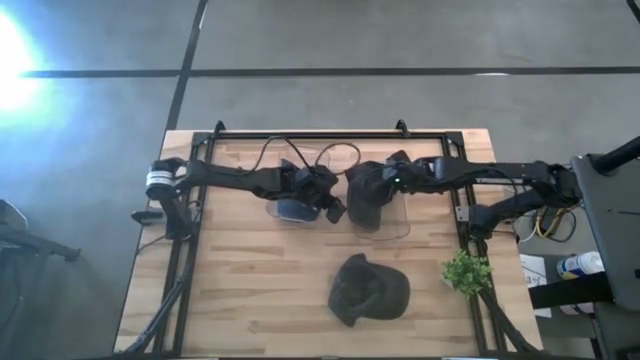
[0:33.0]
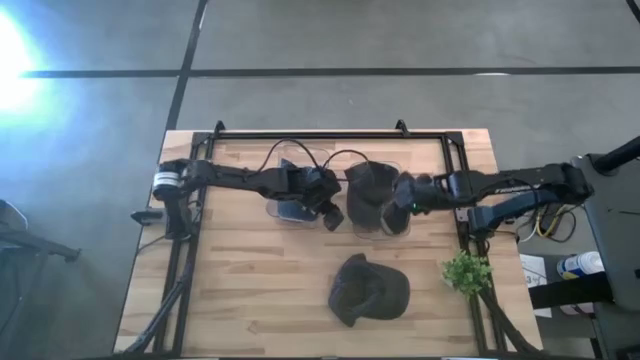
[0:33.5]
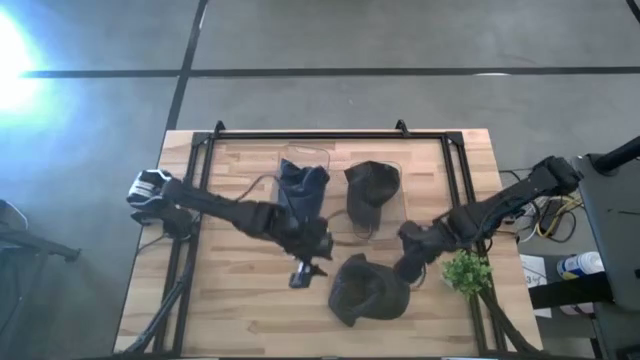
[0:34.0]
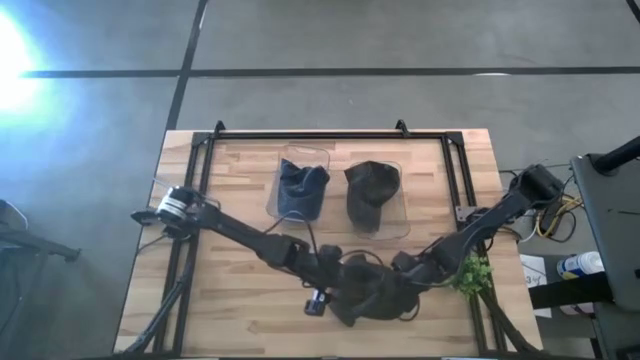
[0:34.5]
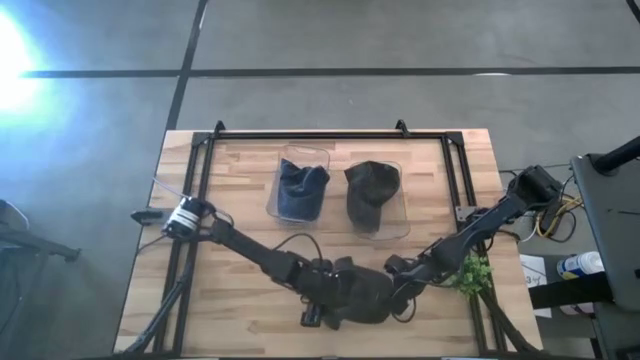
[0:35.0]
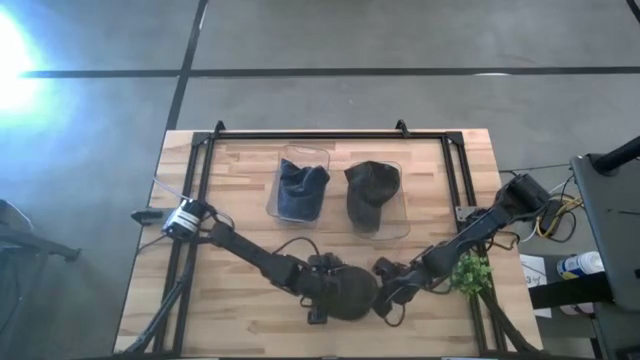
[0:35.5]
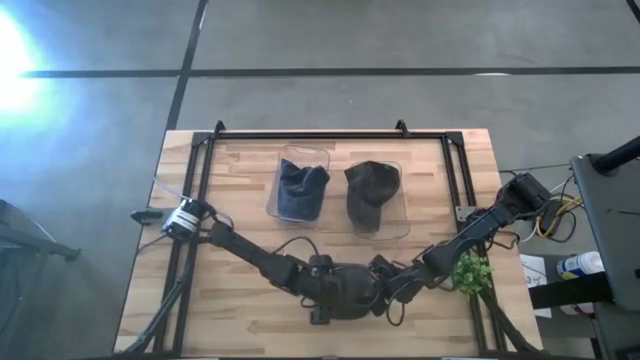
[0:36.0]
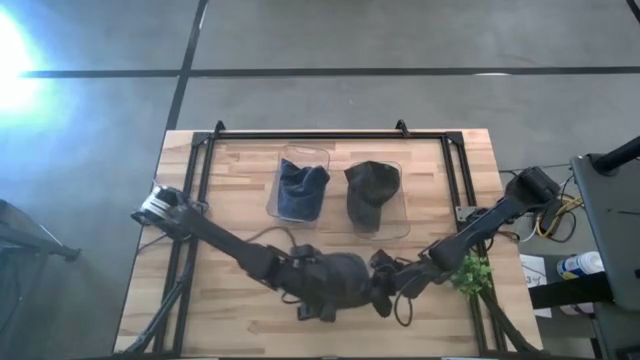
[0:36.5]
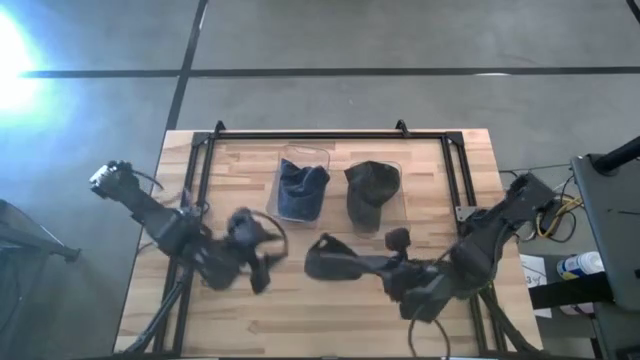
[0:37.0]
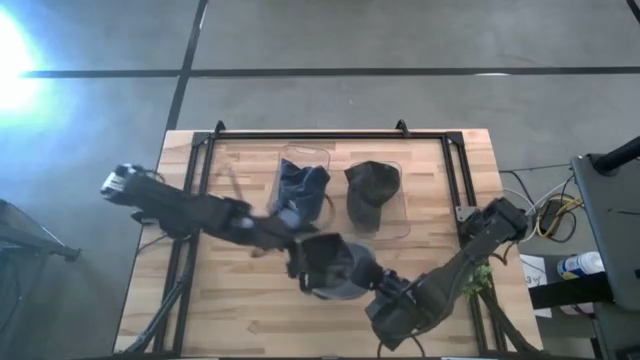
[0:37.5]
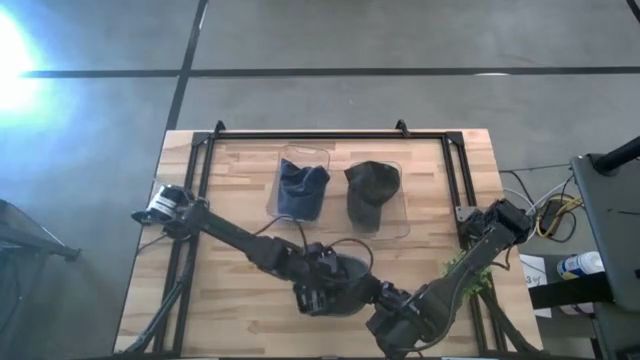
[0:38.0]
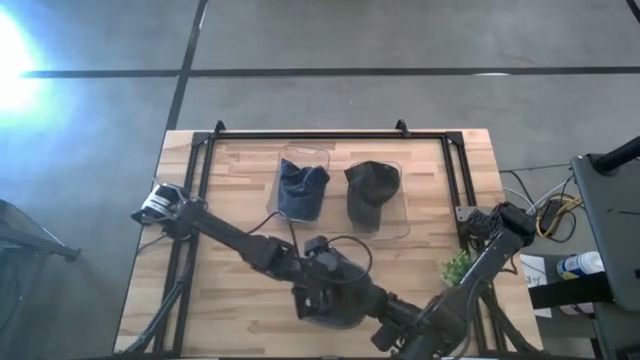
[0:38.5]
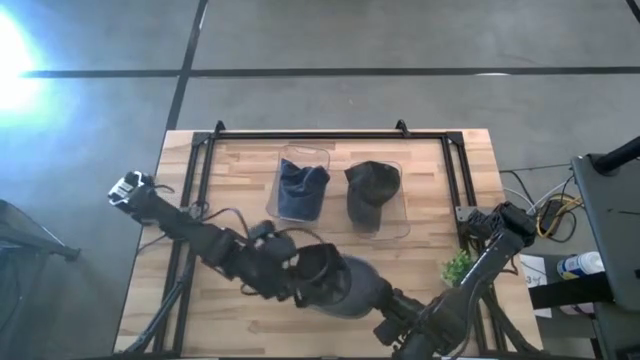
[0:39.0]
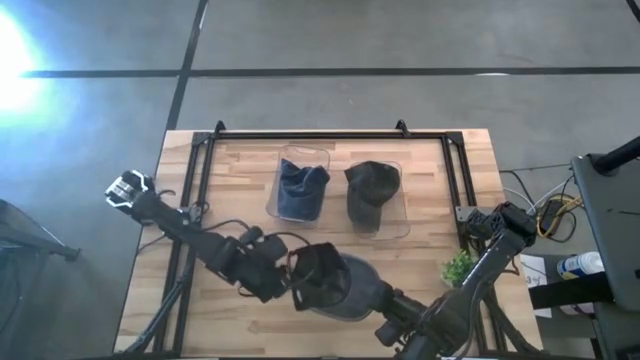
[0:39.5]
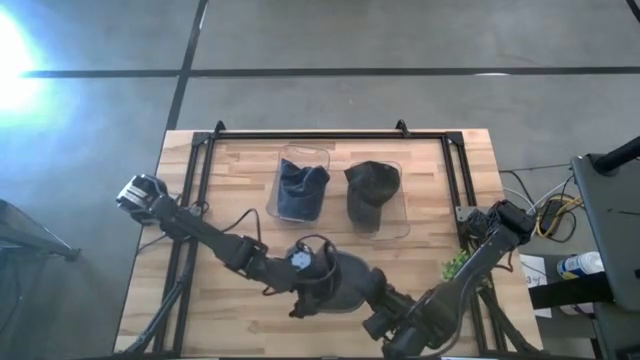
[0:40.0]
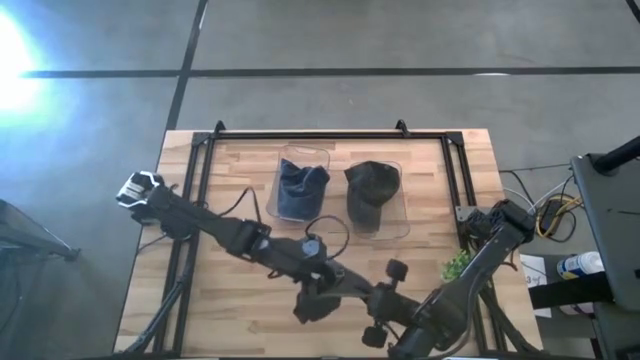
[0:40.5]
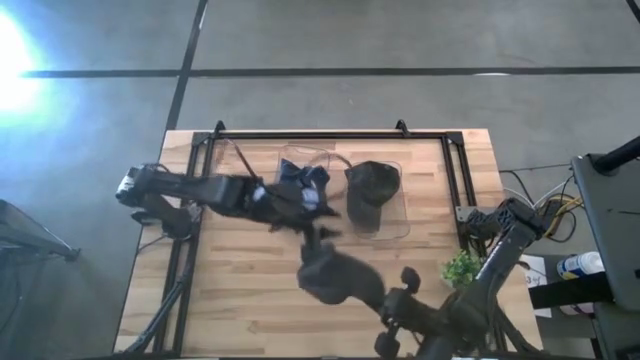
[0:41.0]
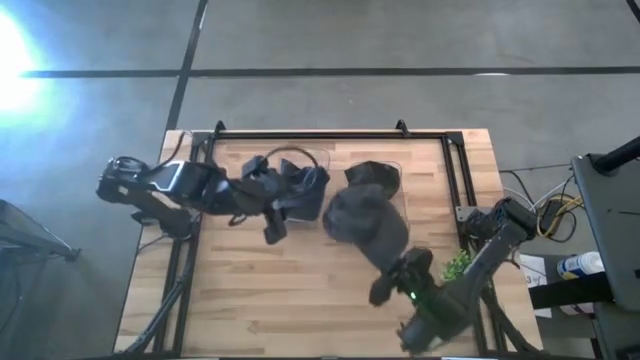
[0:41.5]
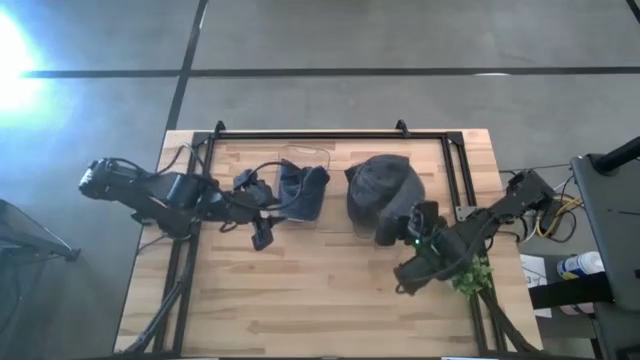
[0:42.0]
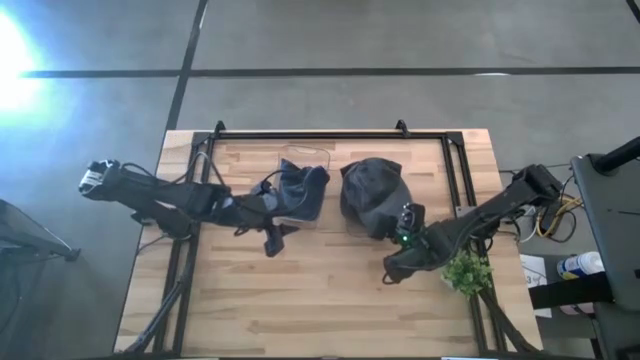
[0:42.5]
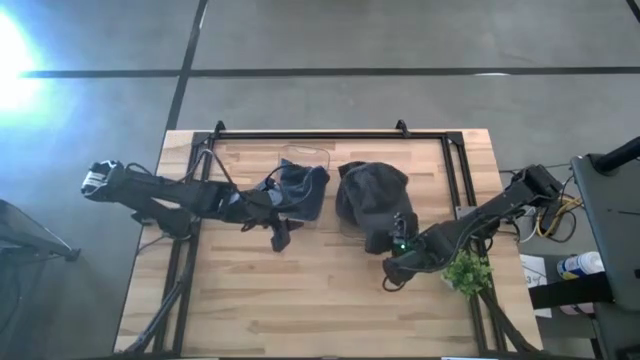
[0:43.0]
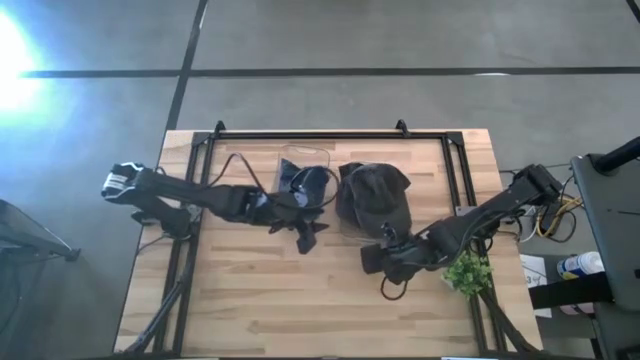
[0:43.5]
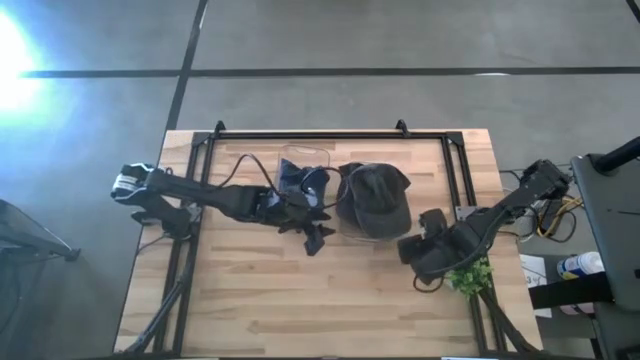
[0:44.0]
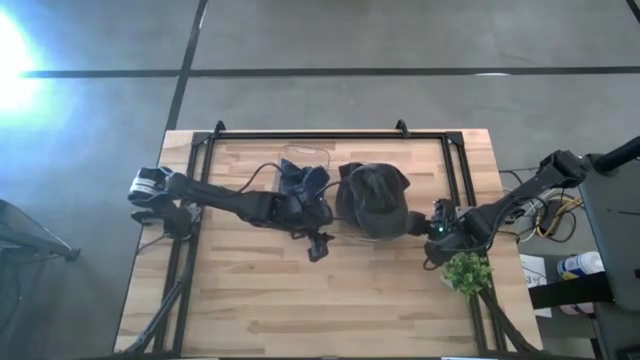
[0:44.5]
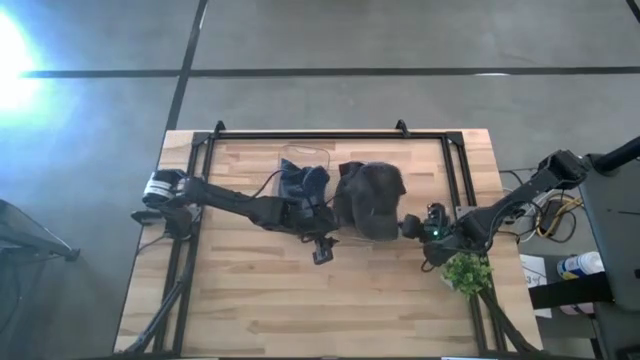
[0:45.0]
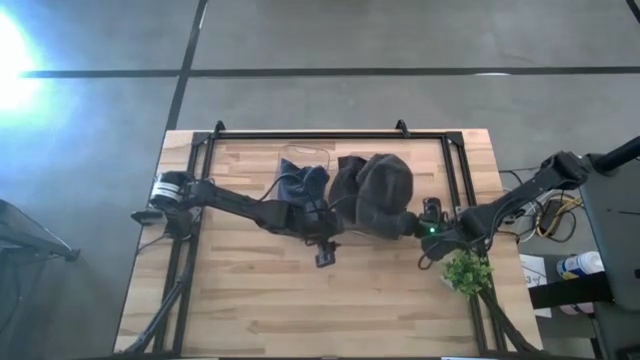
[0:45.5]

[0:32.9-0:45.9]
Task: Pick & Place hat
Put the black cap into the right transparent bin

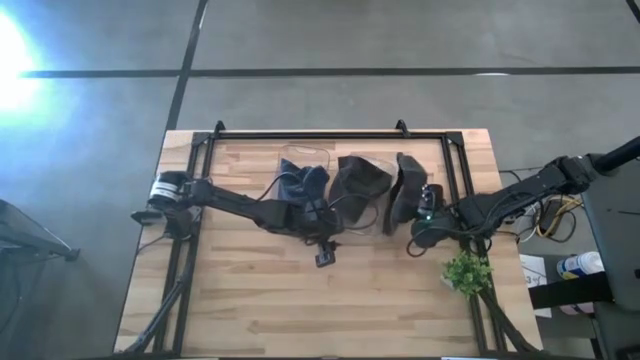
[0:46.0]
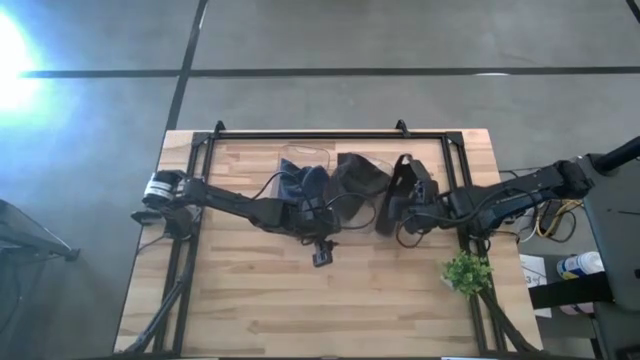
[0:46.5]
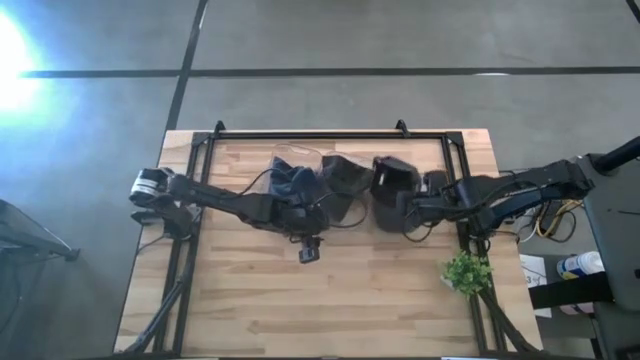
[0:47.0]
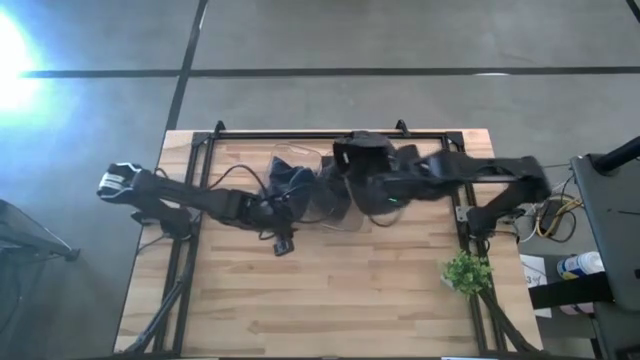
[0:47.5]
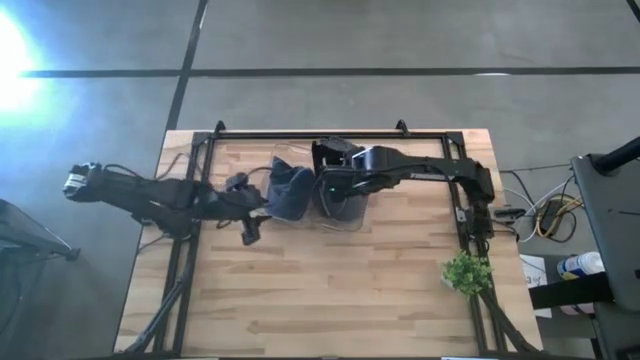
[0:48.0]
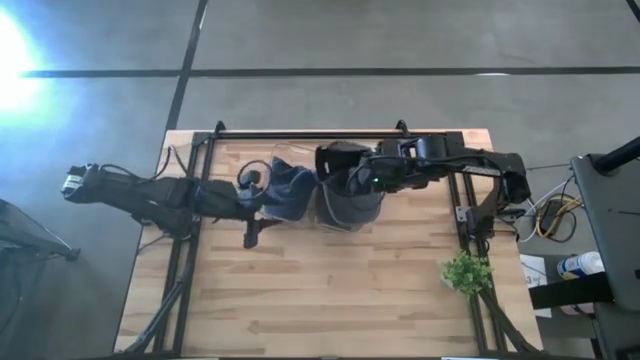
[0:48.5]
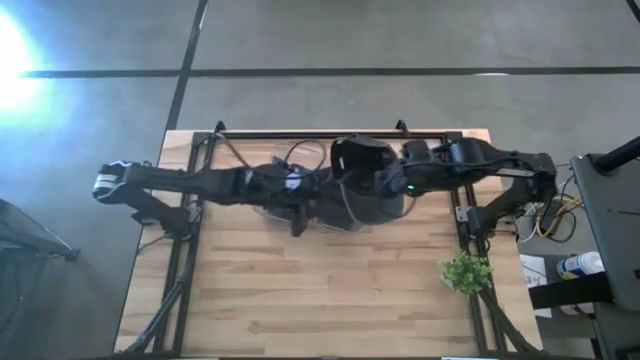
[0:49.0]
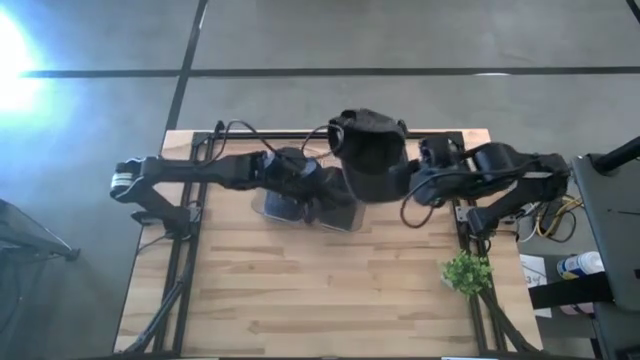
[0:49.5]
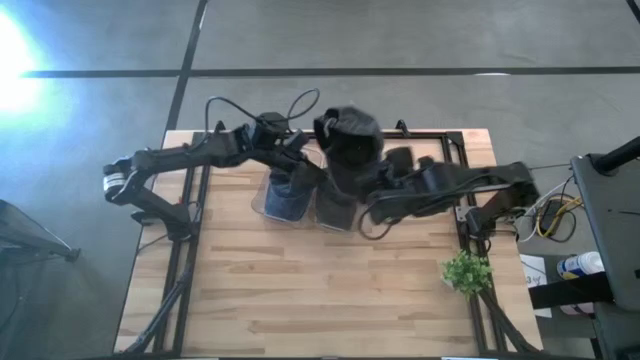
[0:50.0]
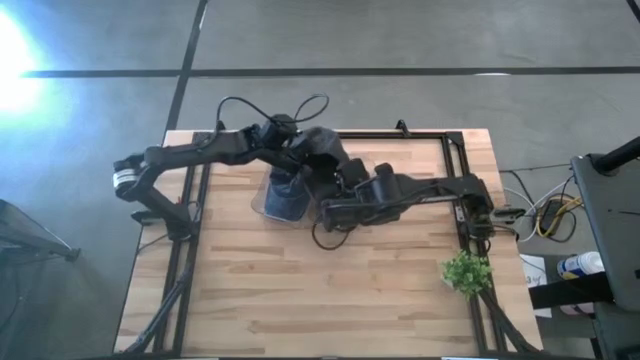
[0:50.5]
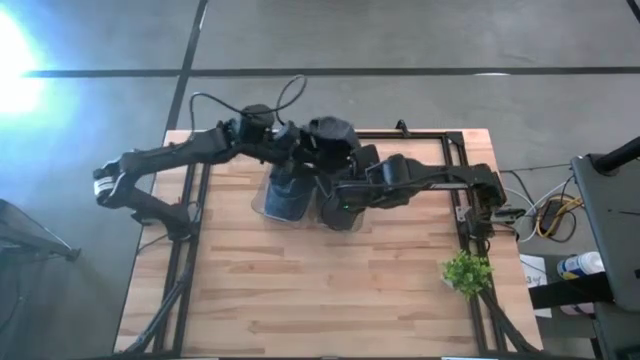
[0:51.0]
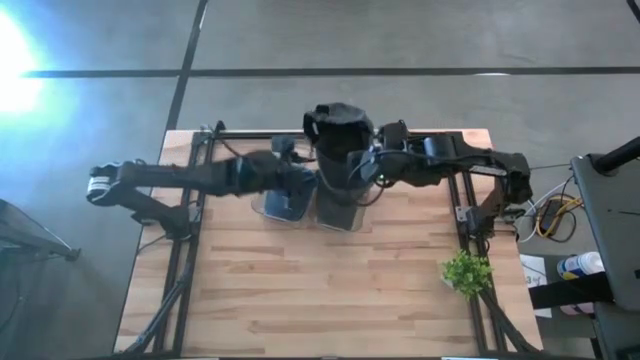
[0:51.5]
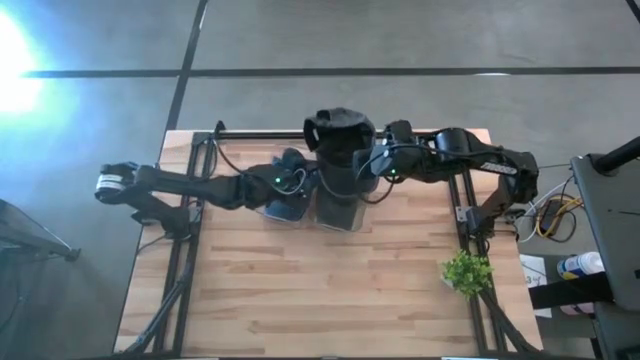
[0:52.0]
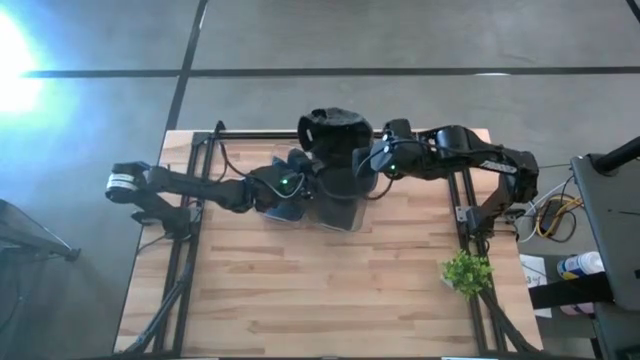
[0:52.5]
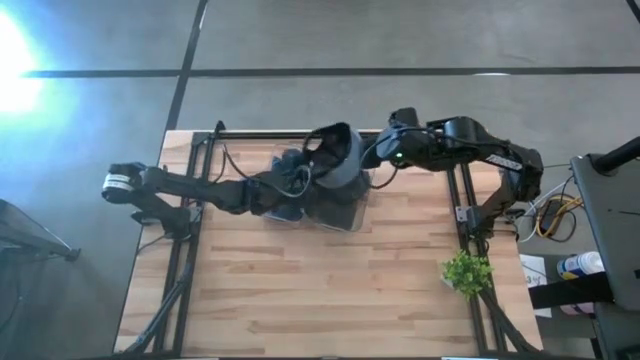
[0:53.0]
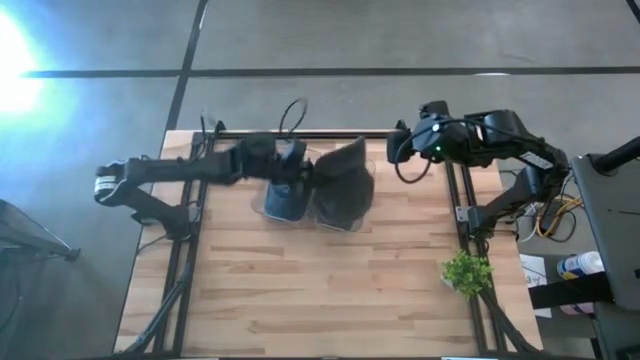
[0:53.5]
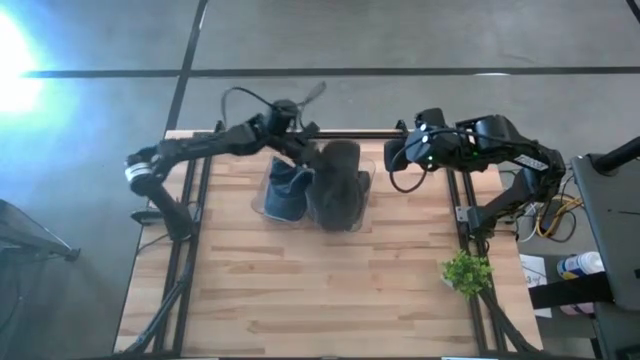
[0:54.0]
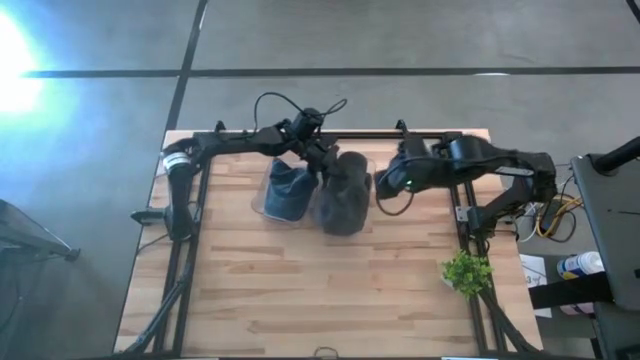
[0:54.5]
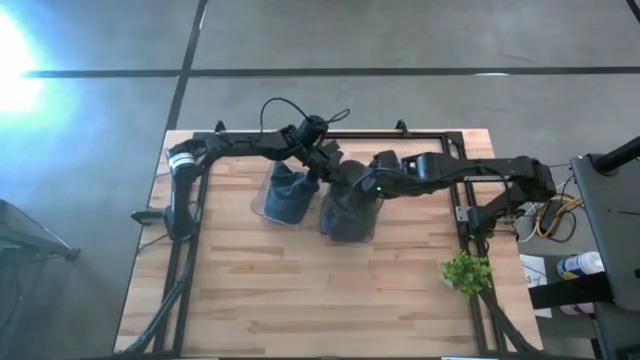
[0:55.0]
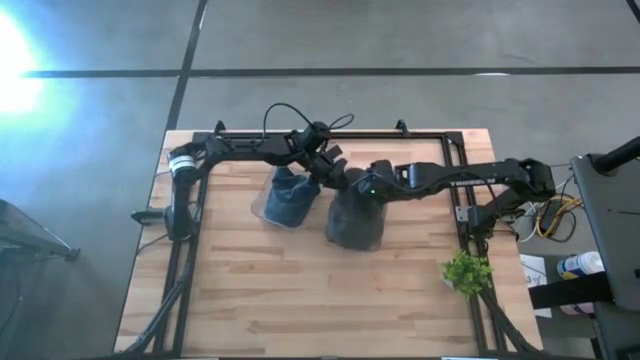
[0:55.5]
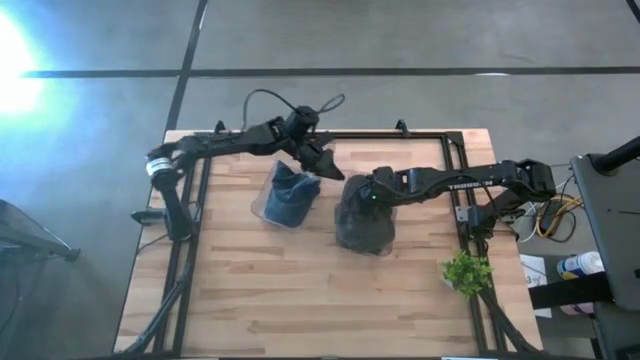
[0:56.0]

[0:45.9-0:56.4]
Put the black cap into the right transparent bin
